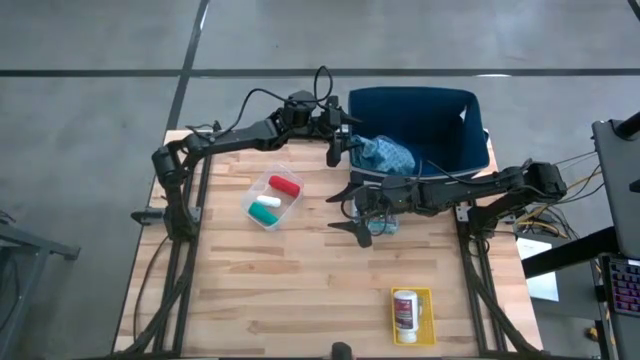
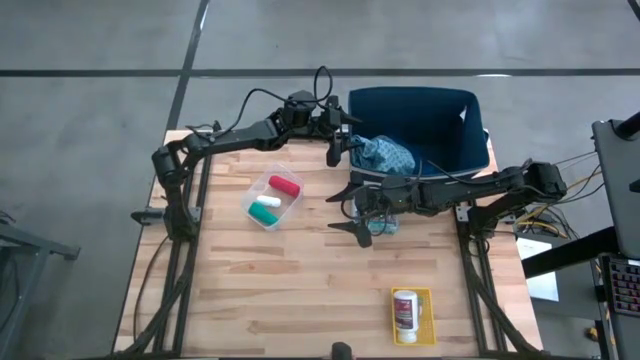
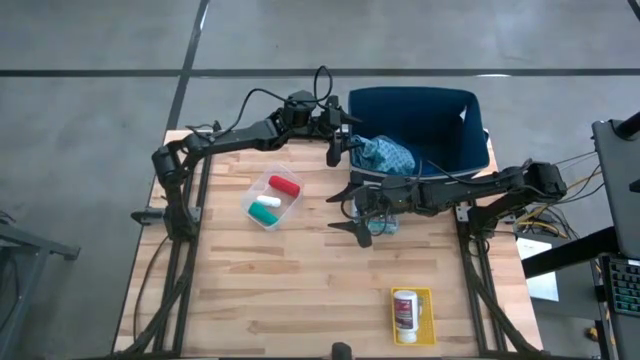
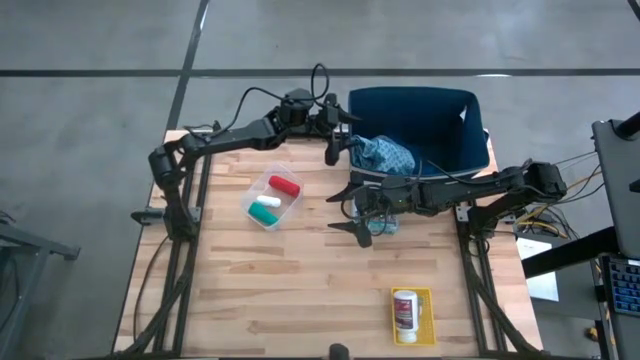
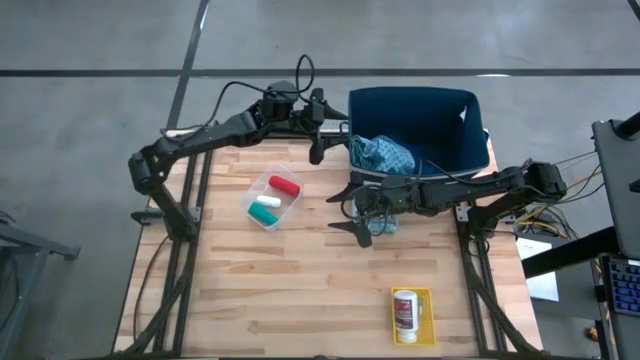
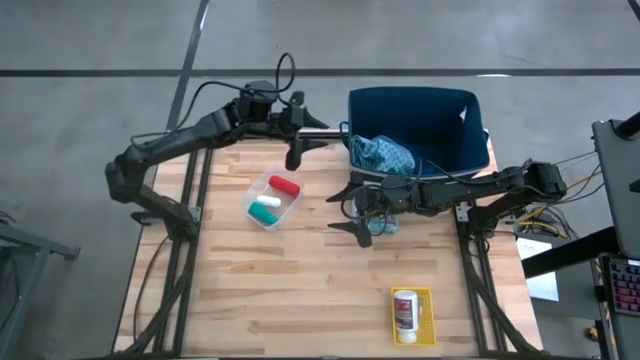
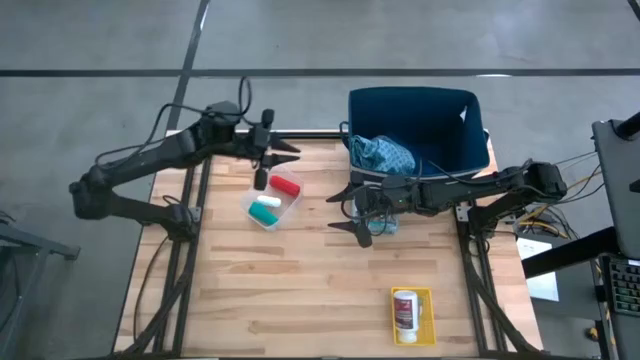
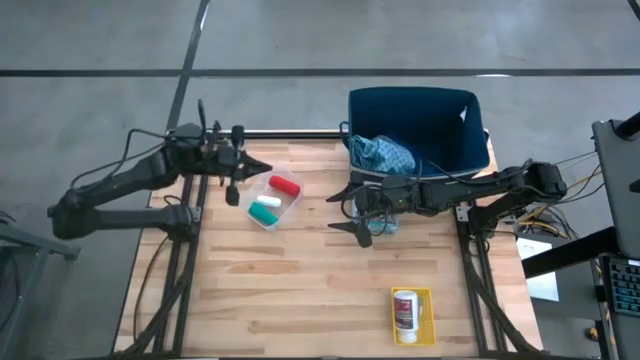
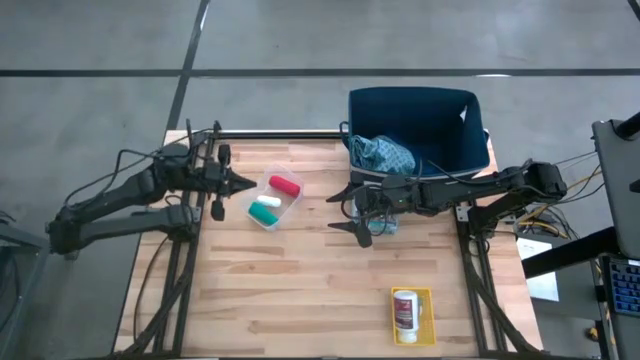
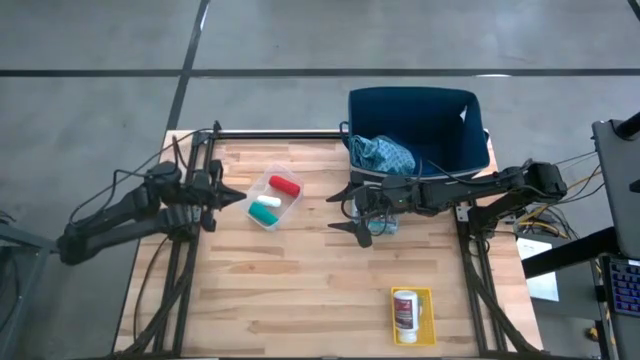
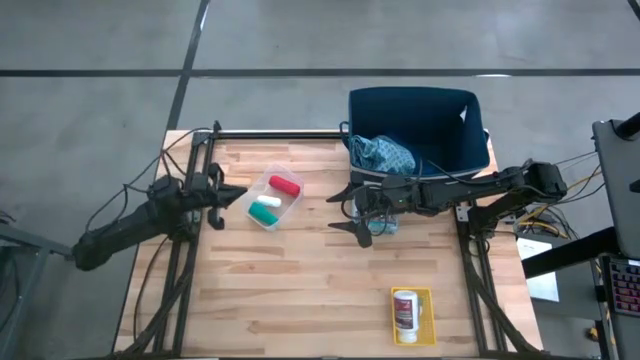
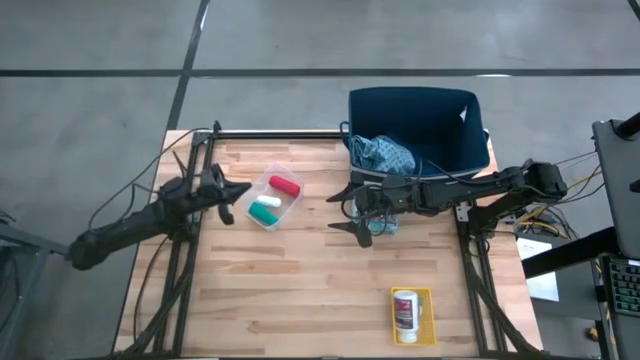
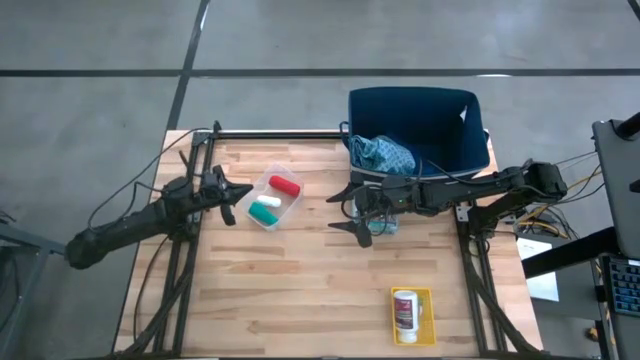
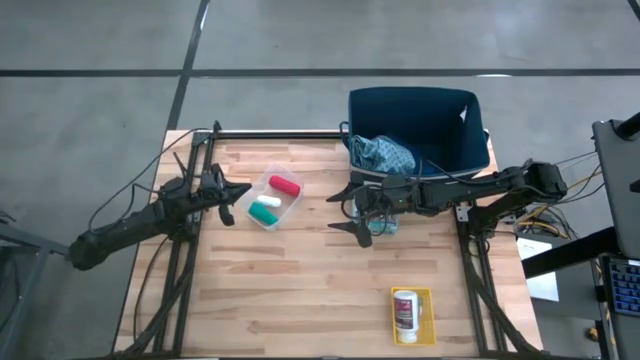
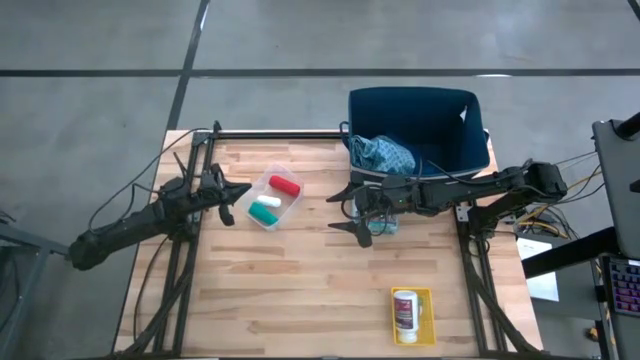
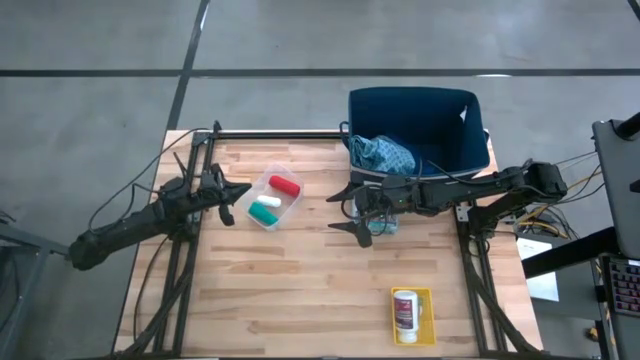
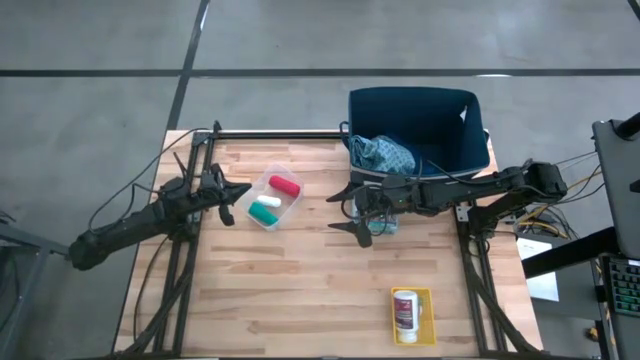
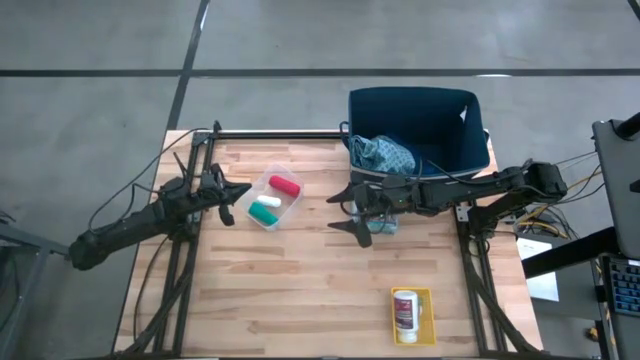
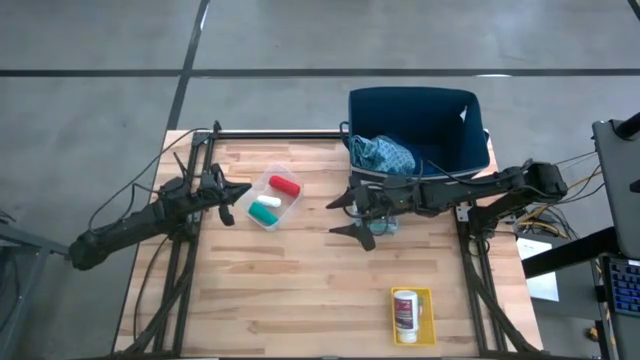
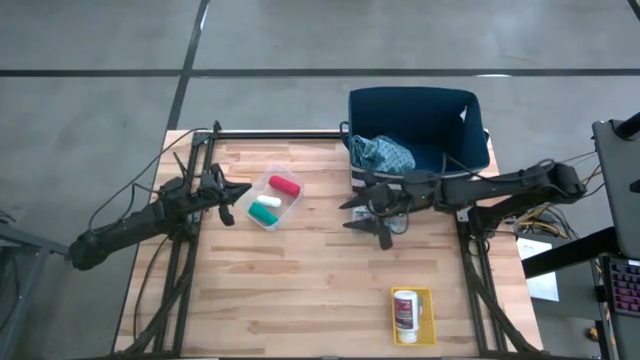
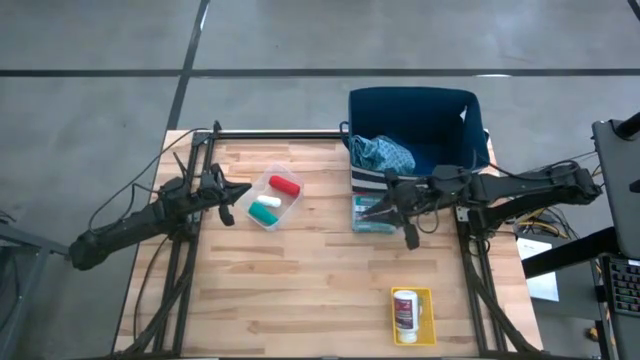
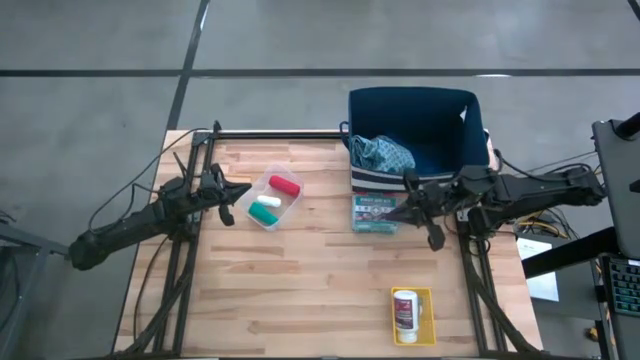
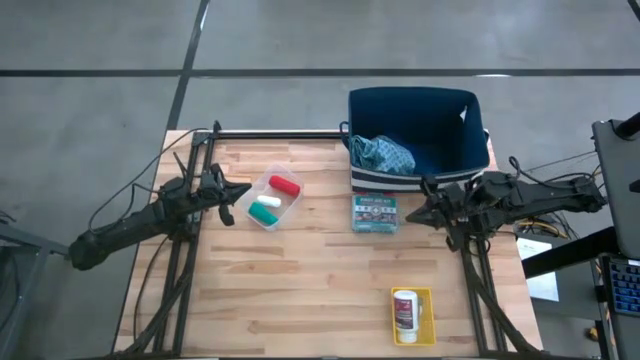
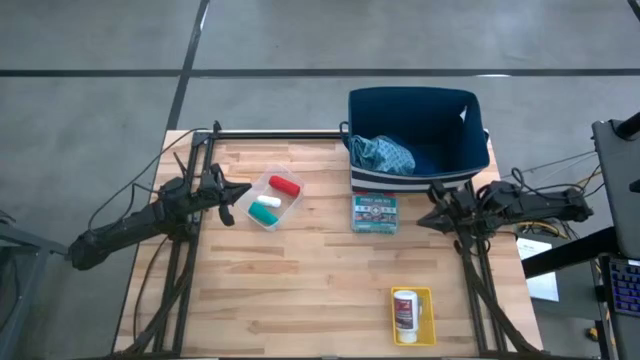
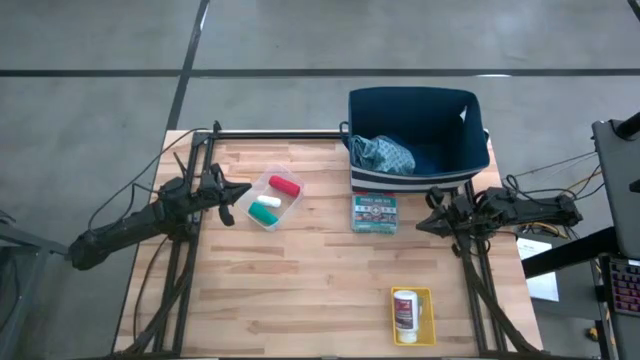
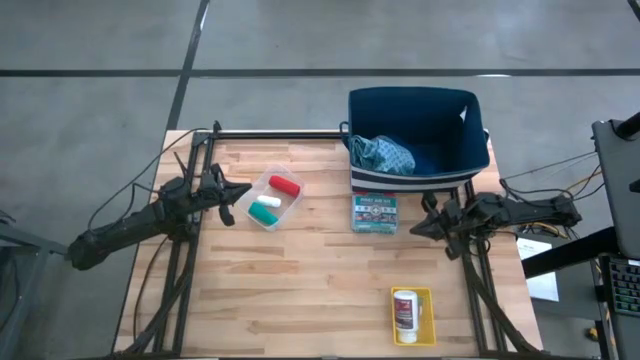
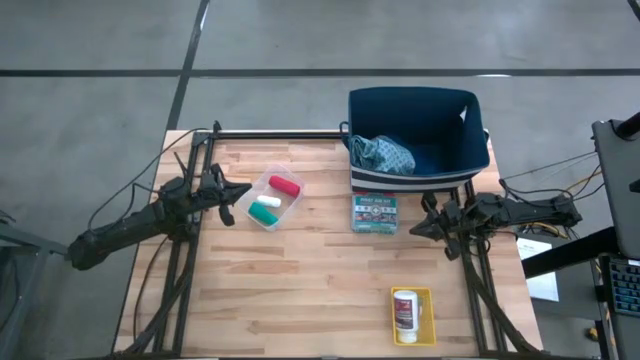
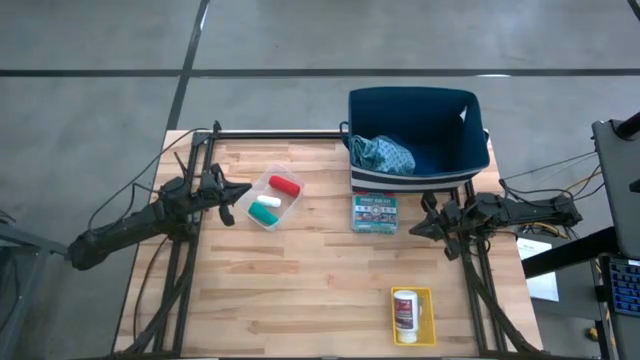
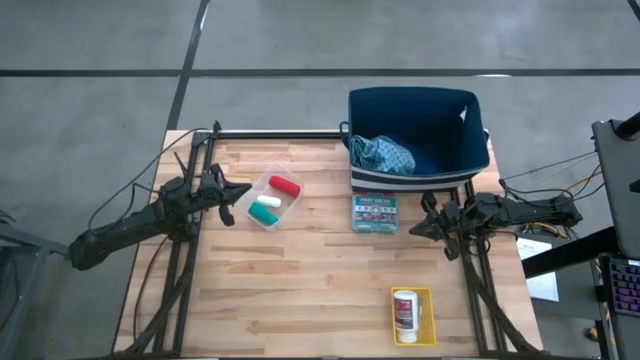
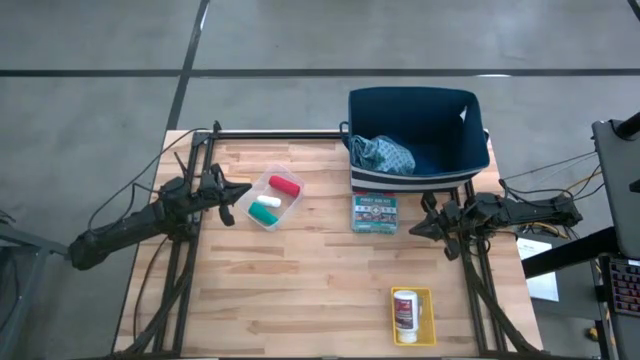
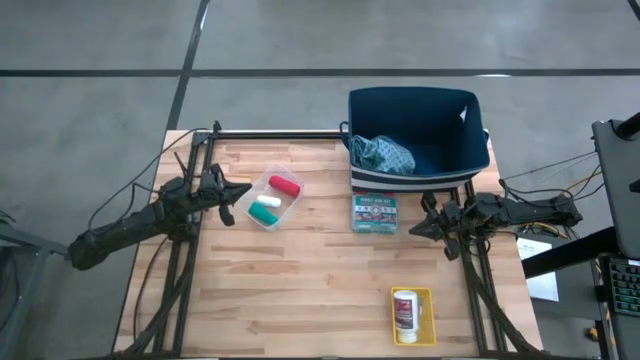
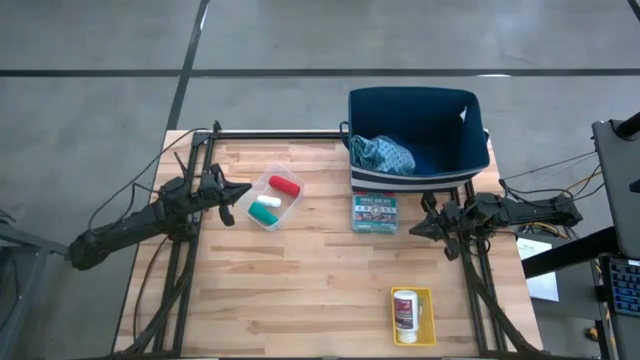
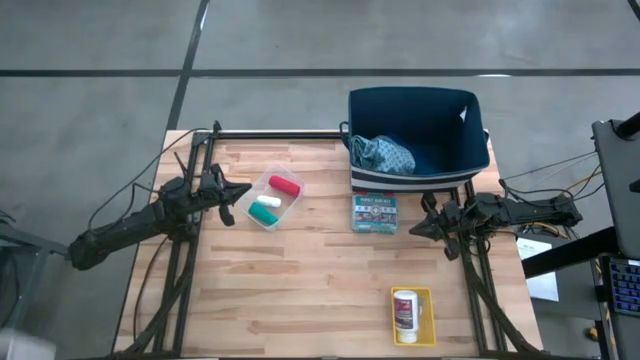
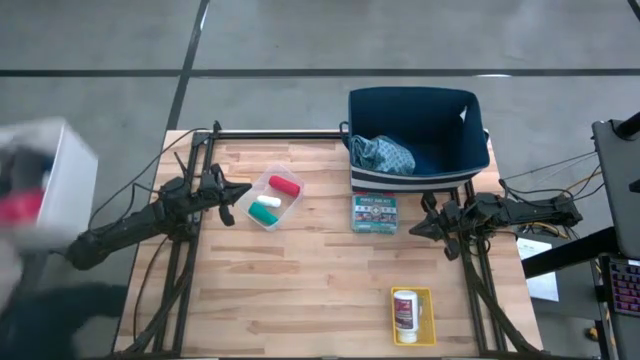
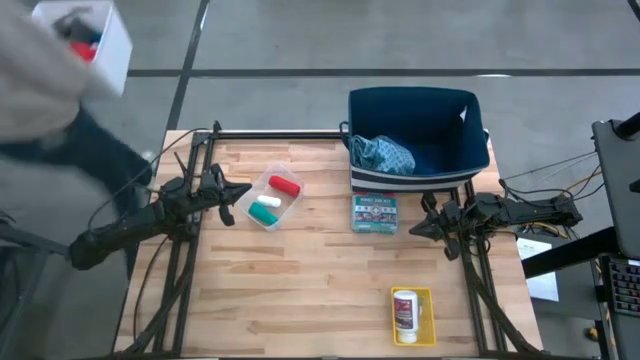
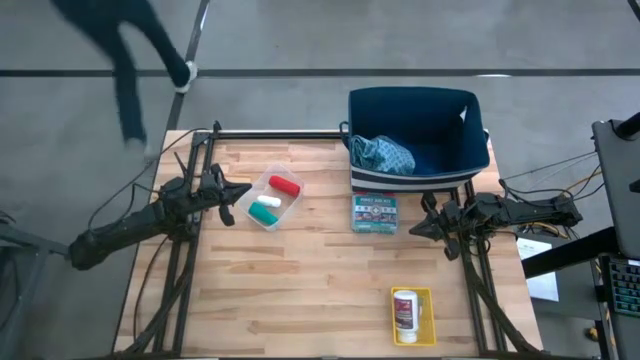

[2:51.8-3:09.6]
Task: Pick & place medical supplies in basket/bin
Return to Home Position

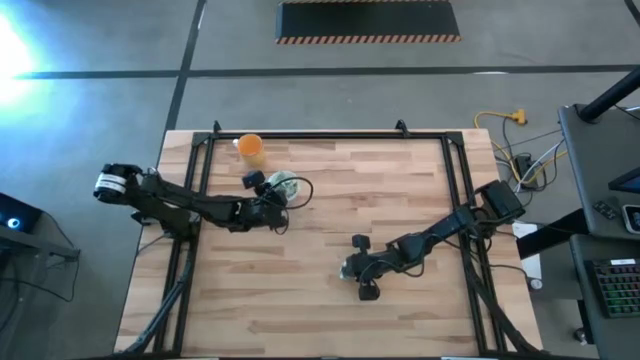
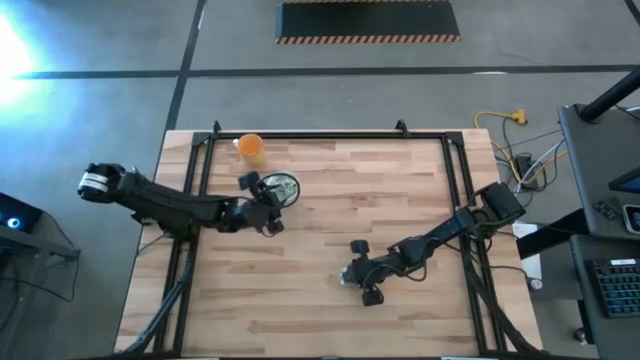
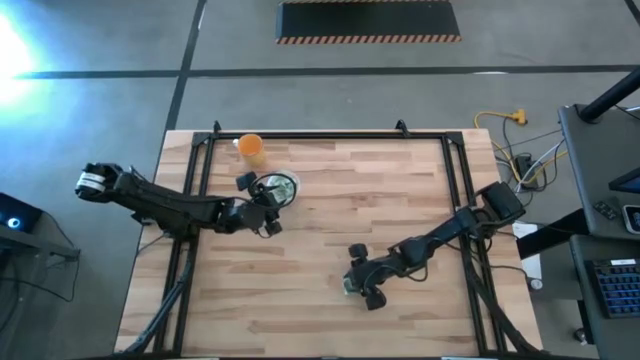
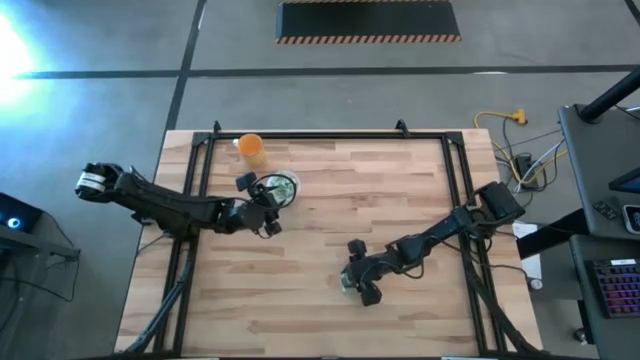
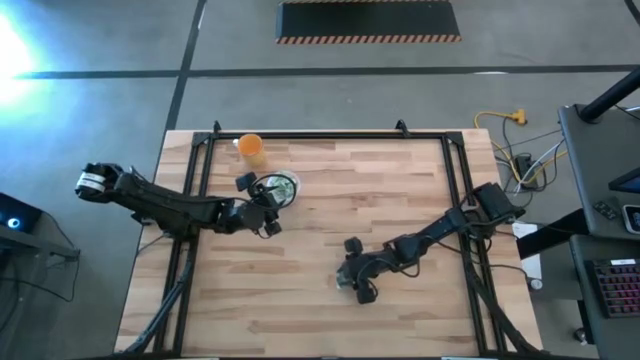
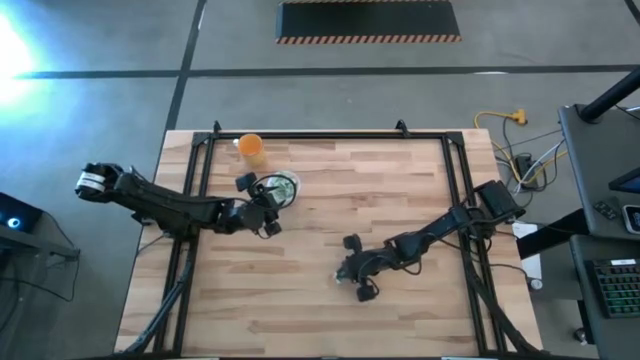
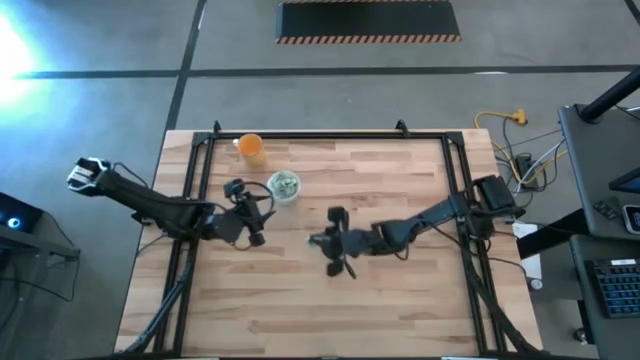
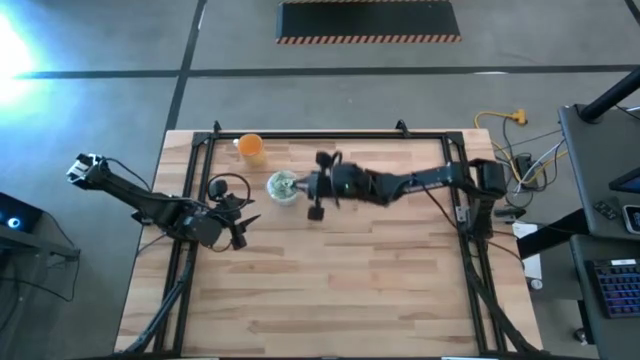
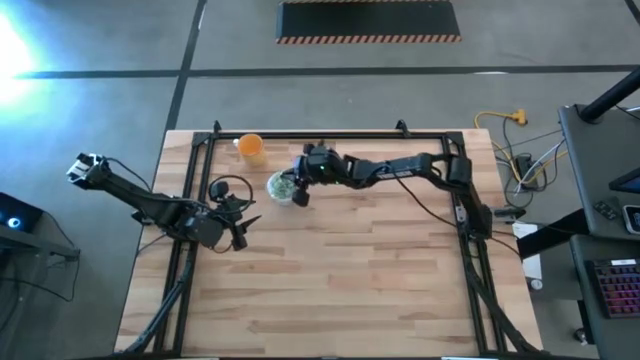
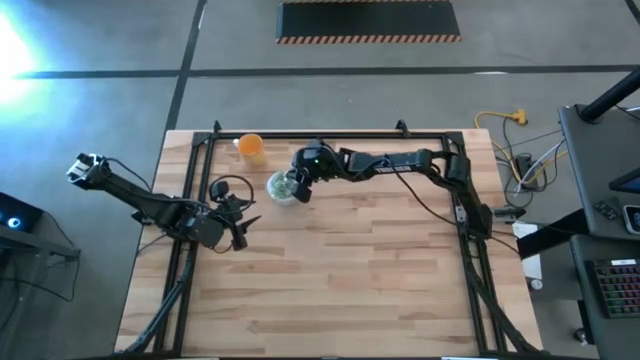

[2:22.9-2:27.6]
Task: Pick and place Stevia / Truvia into bins
Put the stevia packet into the transparent container
